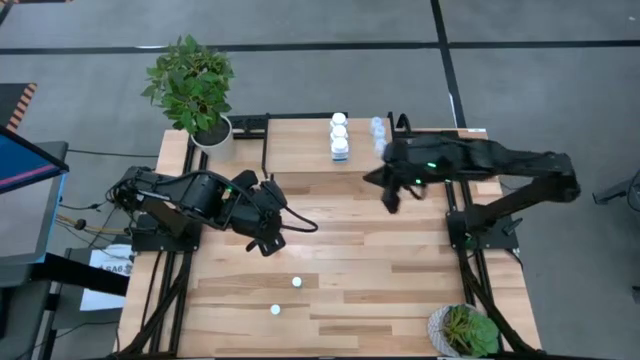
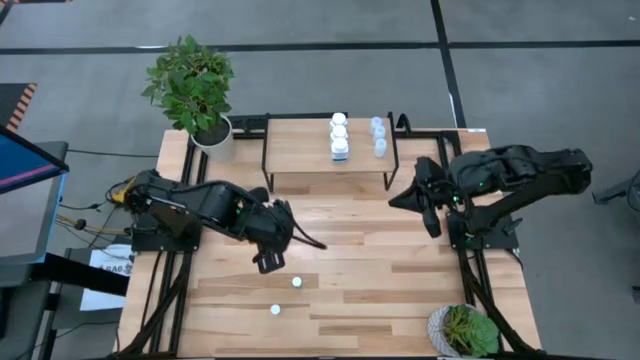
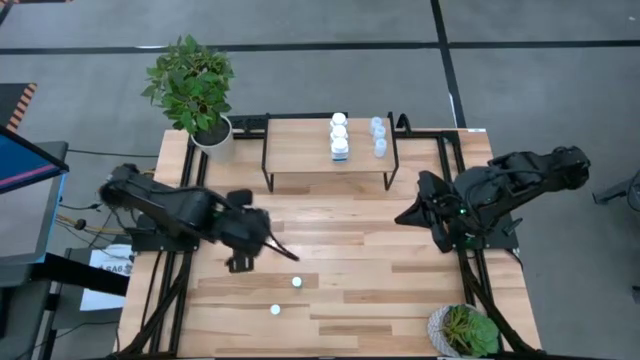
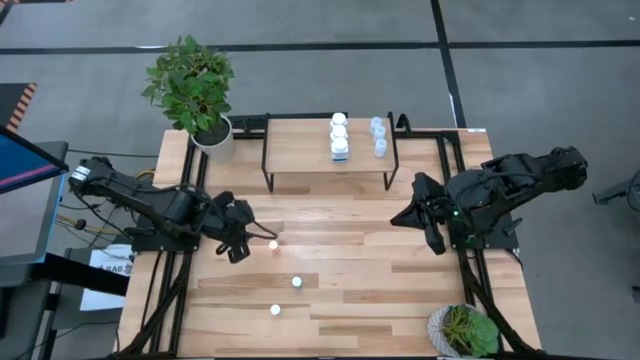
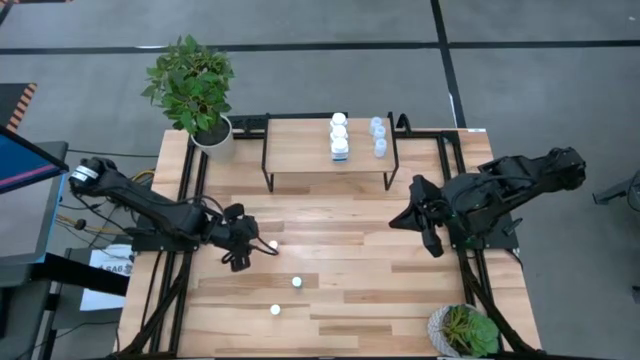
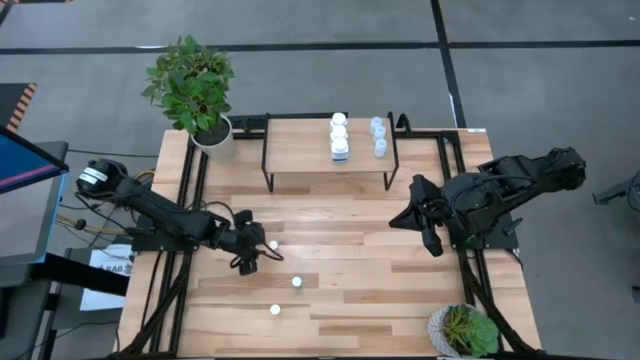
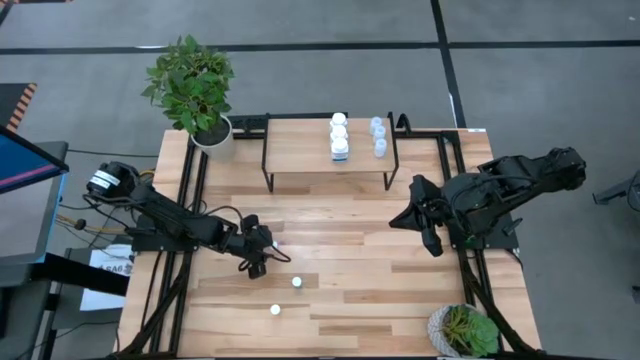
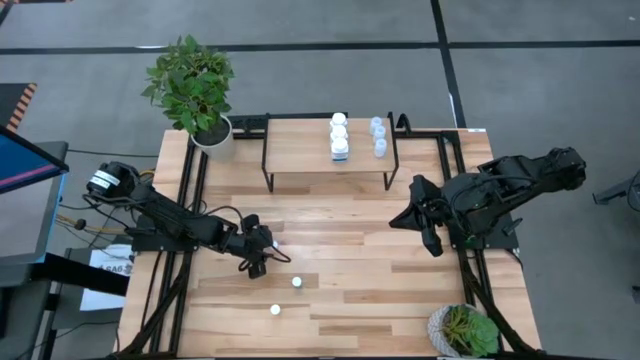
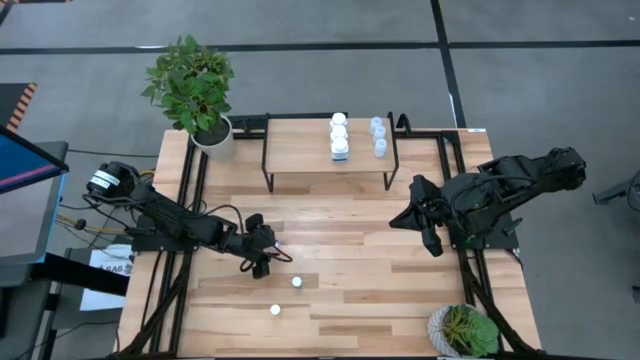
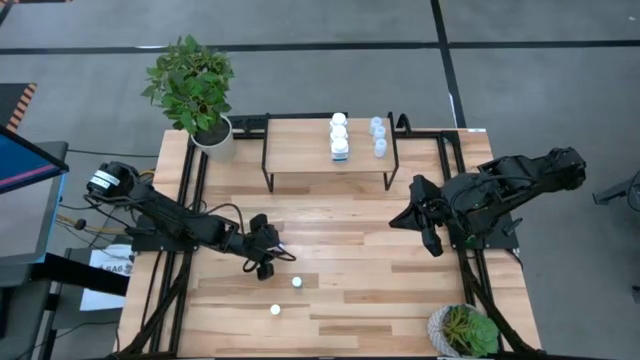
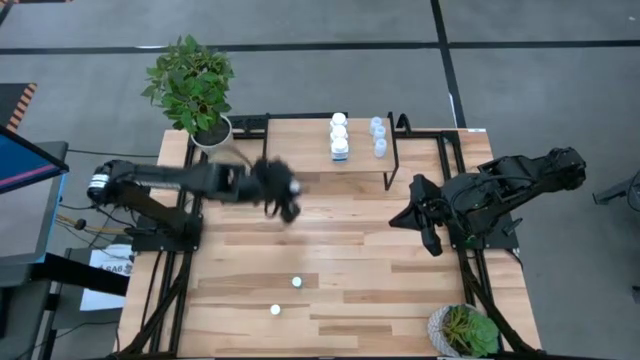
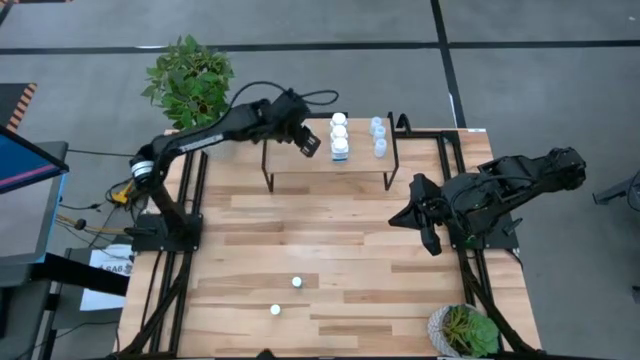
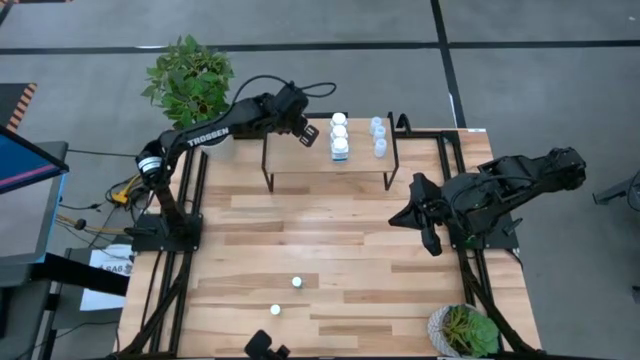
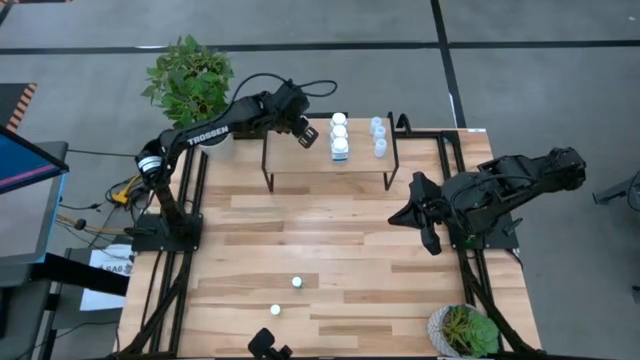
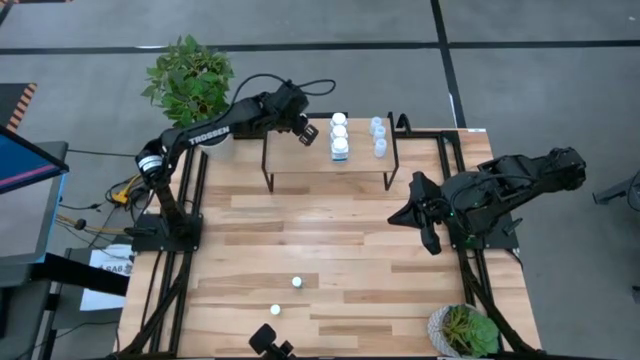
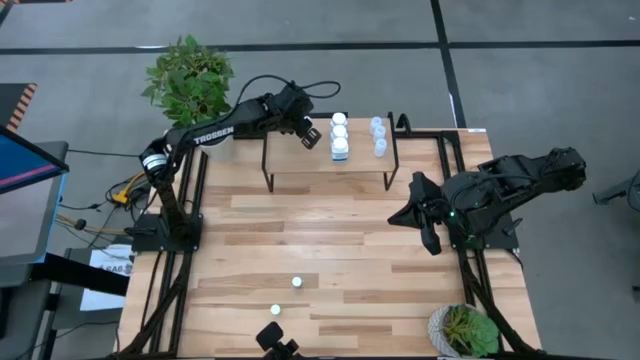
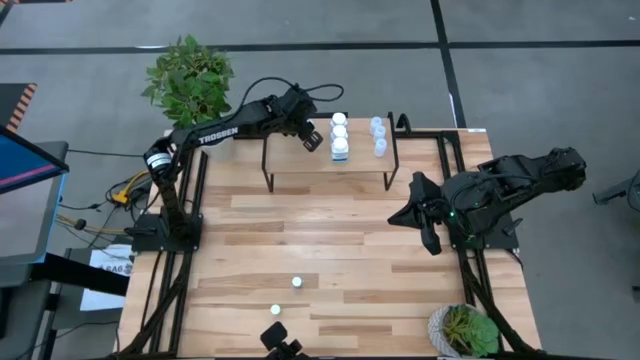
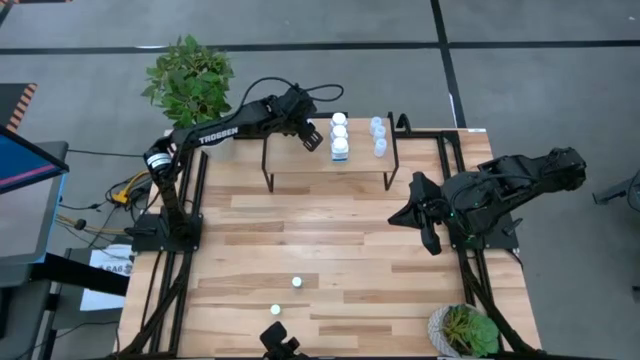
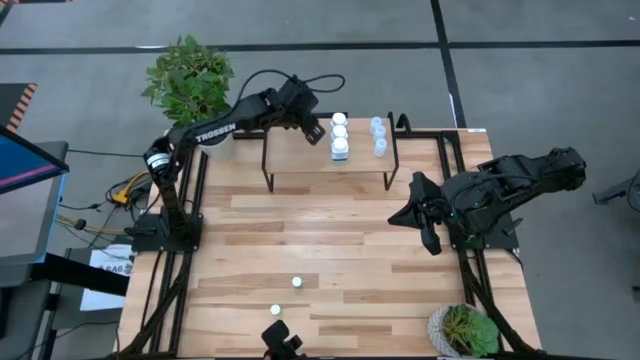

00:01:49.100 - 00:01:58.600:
Task: Pick and place medicine bottles onto shelf by color
Put the pink medicine bottle on the shelf

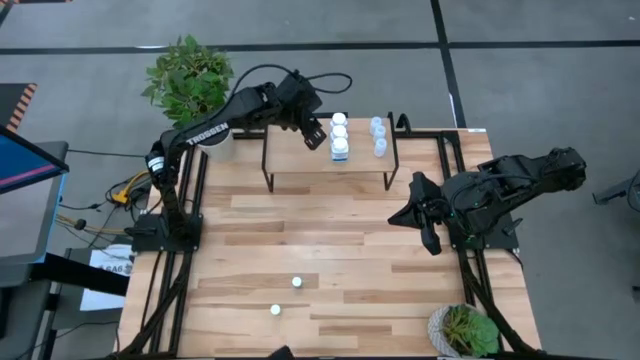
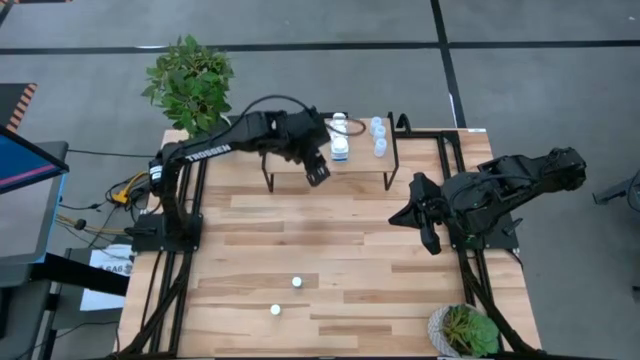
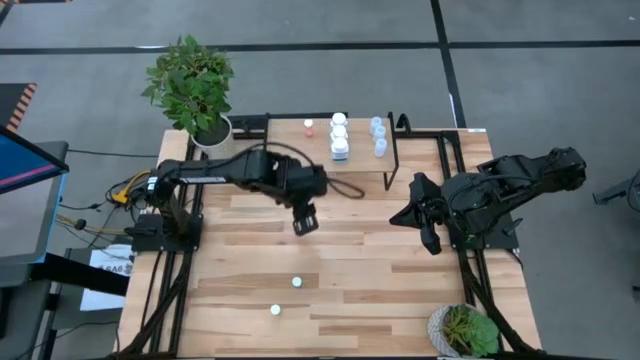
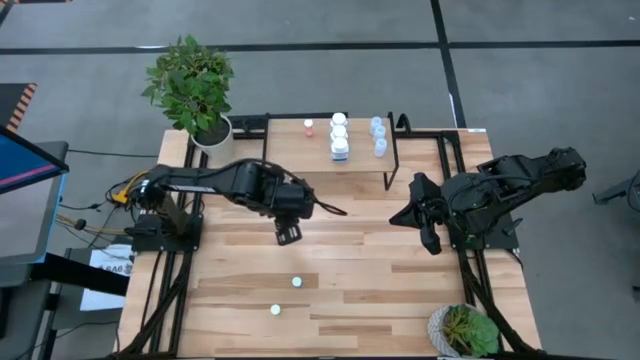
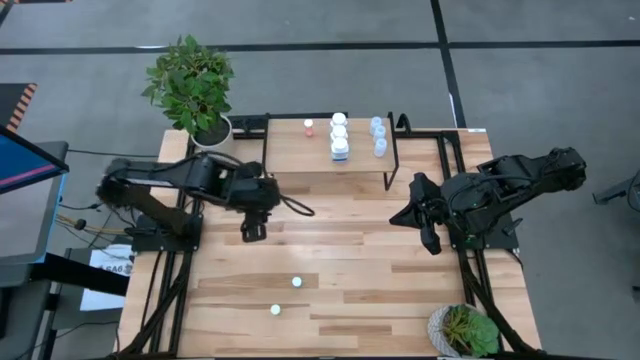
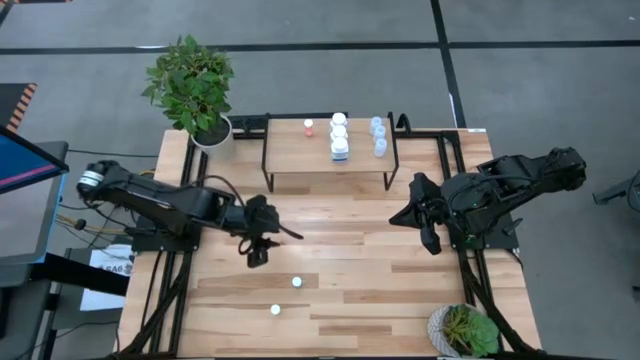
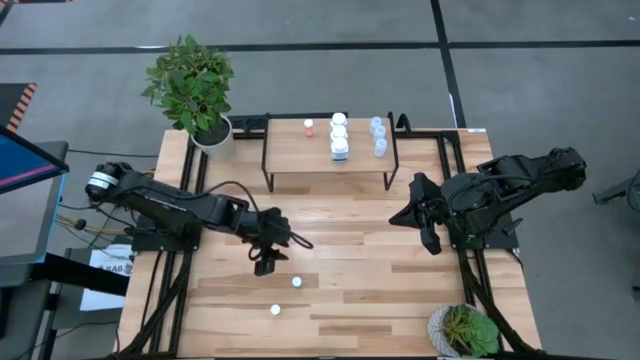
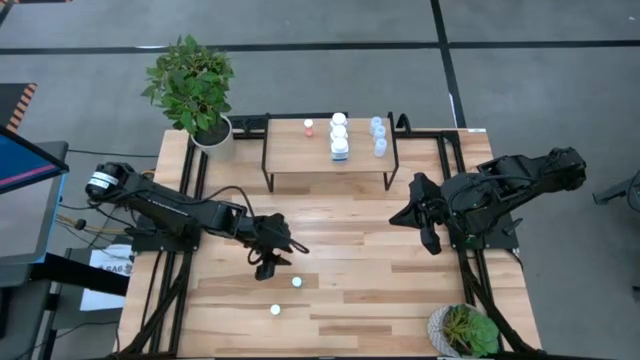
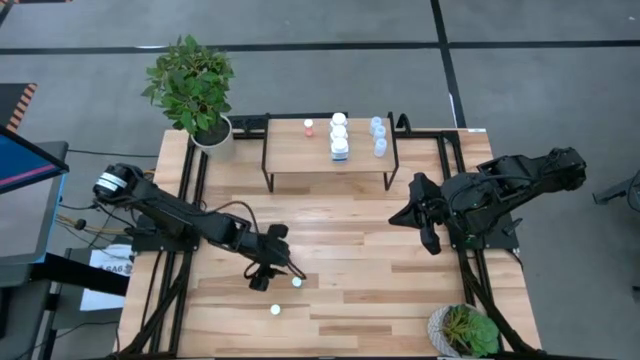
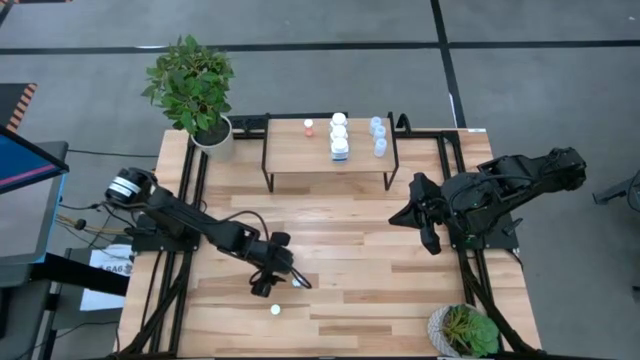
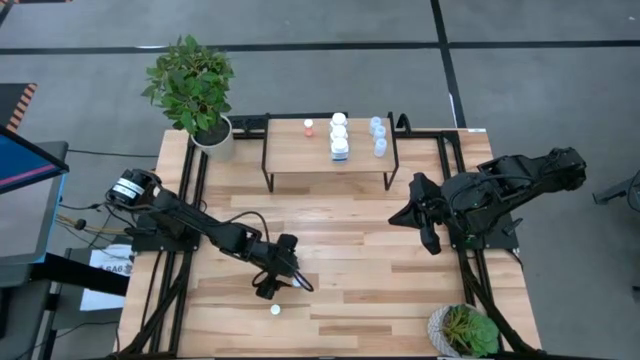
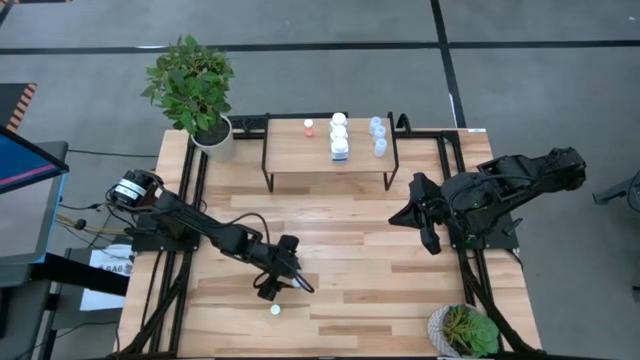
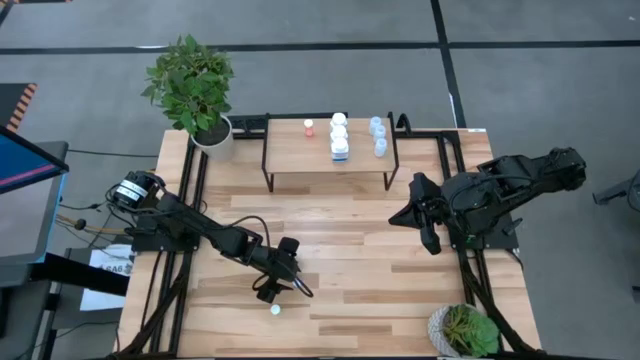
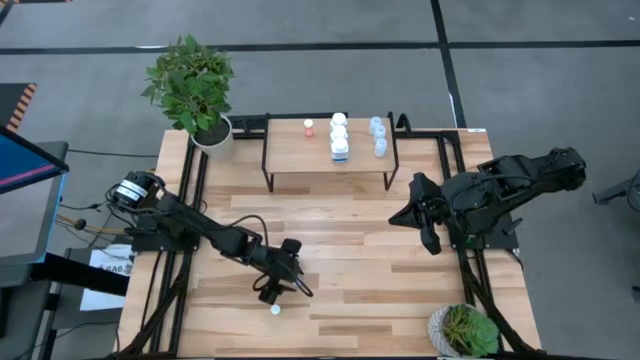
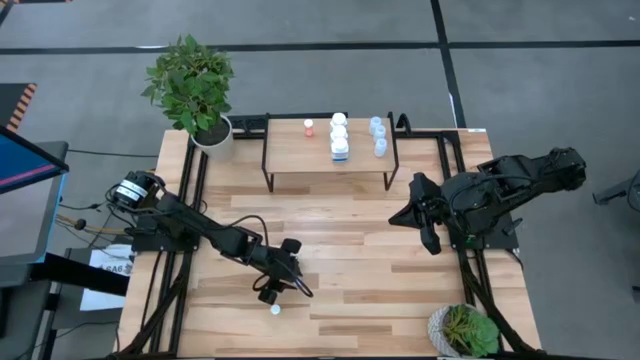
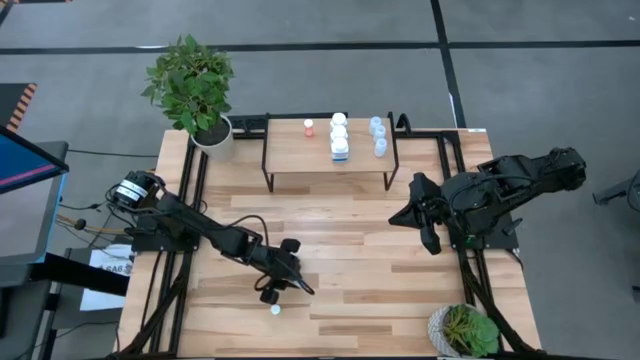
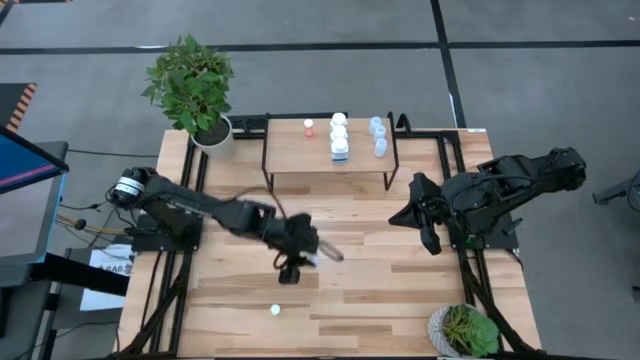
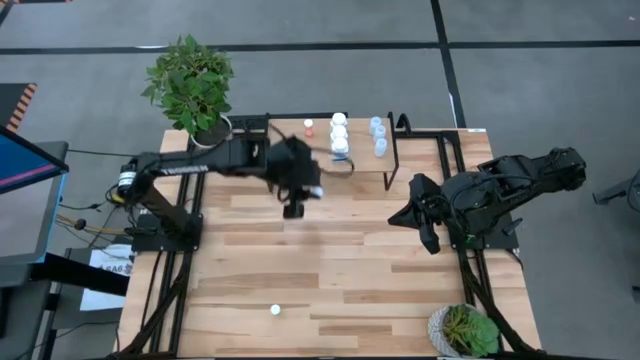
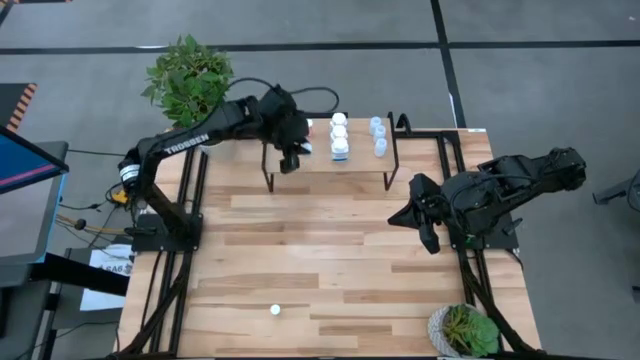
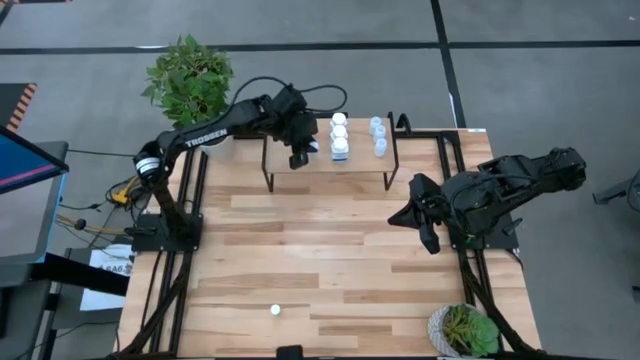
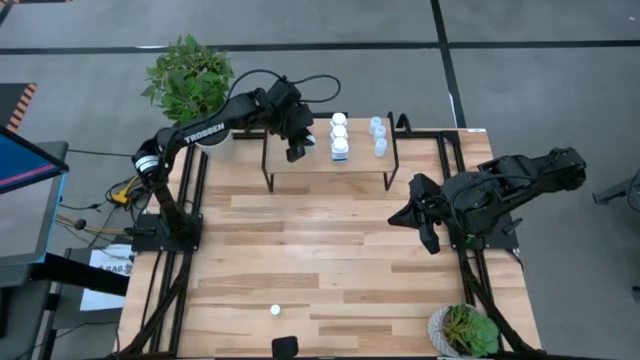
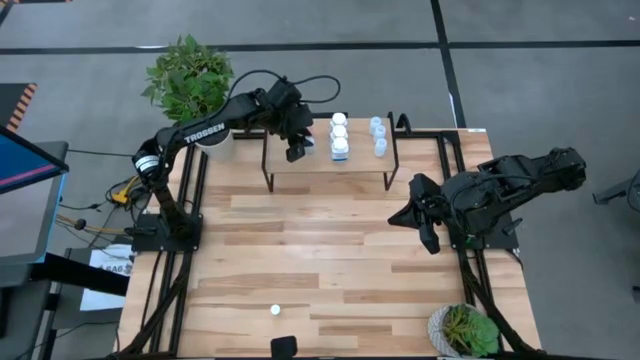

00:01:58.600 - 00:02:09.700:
Put the blue medicine bottle on the shelf
